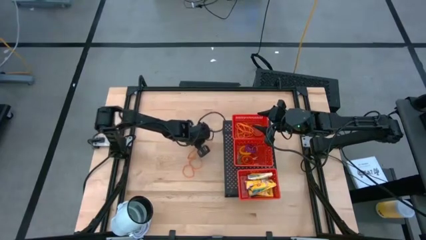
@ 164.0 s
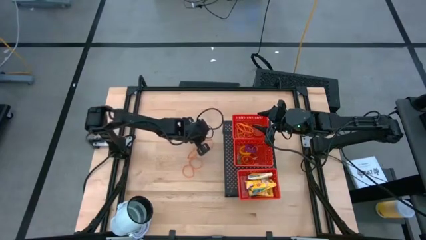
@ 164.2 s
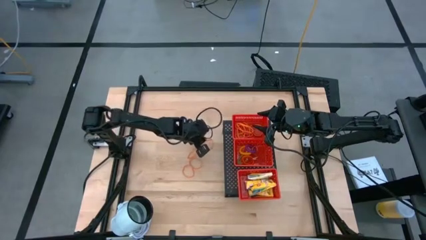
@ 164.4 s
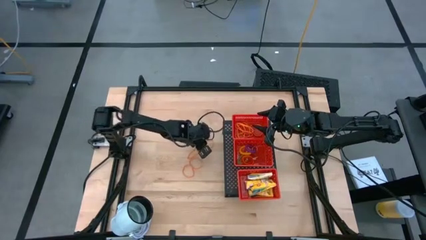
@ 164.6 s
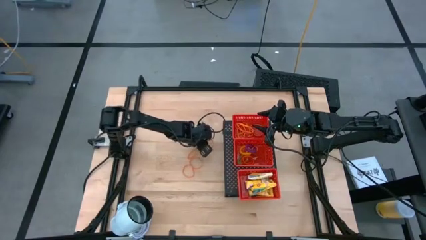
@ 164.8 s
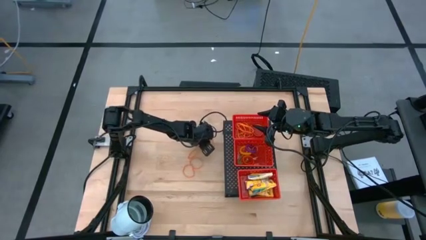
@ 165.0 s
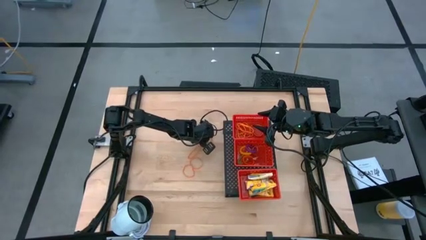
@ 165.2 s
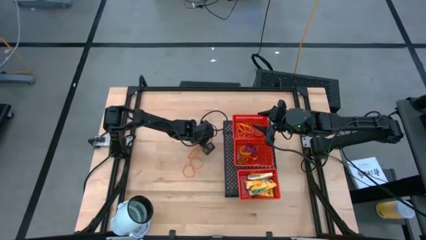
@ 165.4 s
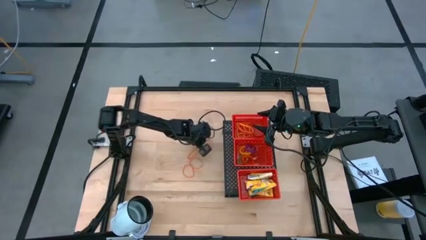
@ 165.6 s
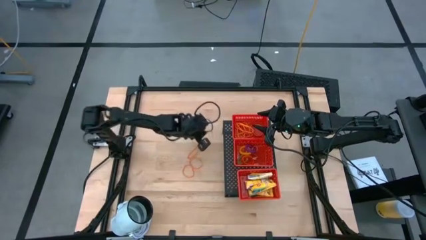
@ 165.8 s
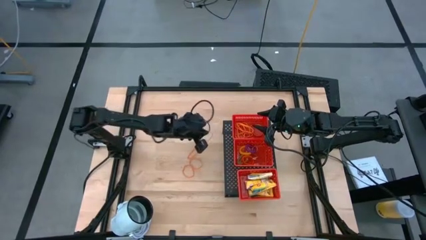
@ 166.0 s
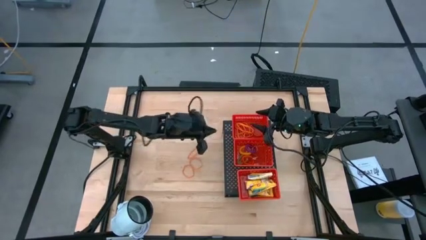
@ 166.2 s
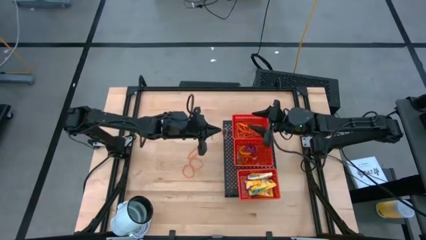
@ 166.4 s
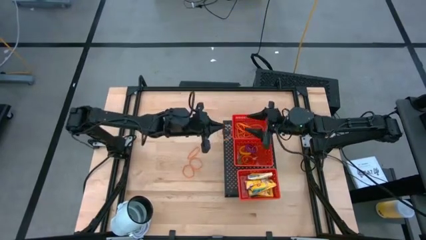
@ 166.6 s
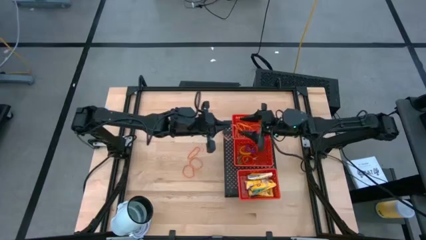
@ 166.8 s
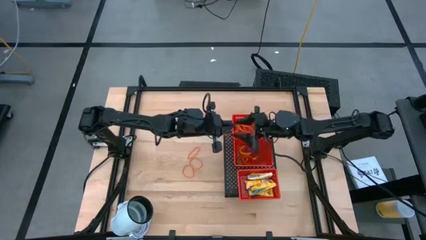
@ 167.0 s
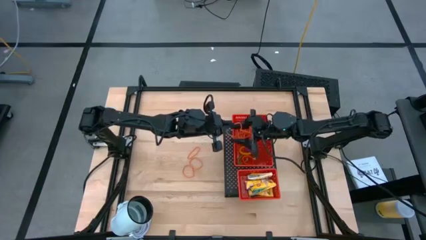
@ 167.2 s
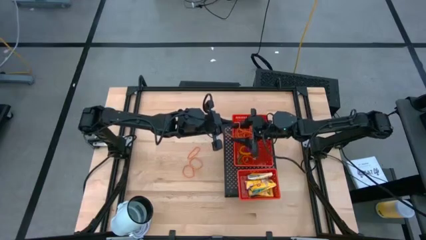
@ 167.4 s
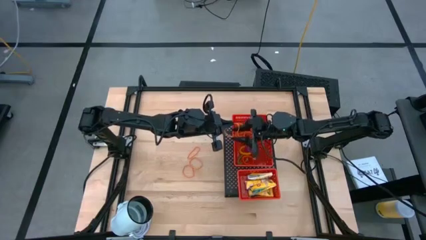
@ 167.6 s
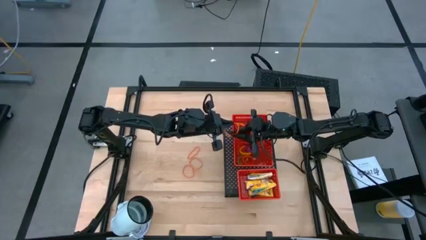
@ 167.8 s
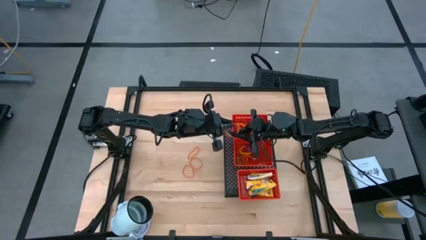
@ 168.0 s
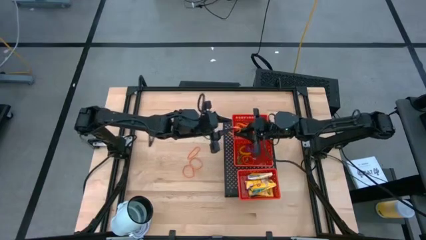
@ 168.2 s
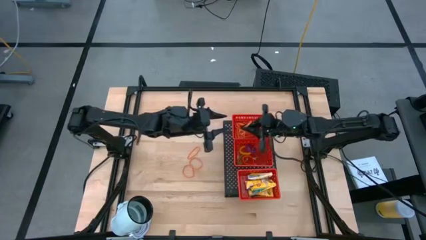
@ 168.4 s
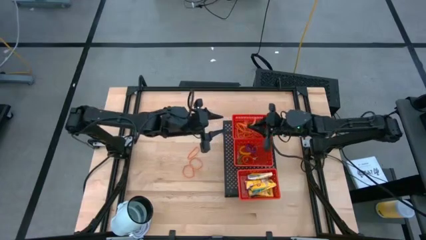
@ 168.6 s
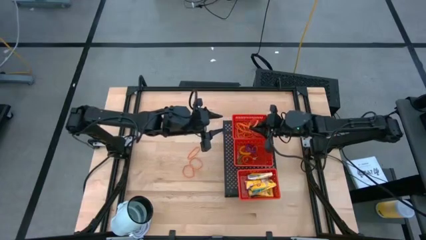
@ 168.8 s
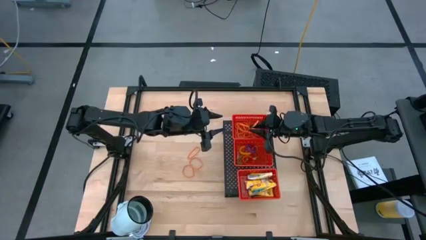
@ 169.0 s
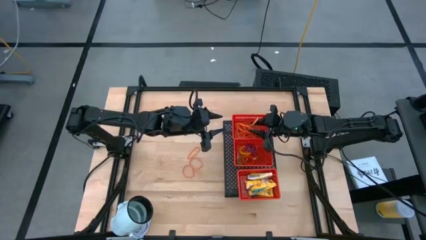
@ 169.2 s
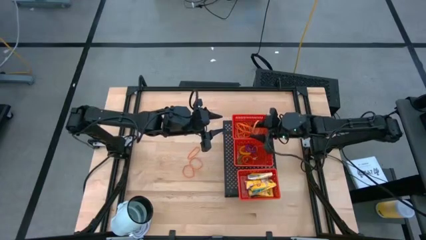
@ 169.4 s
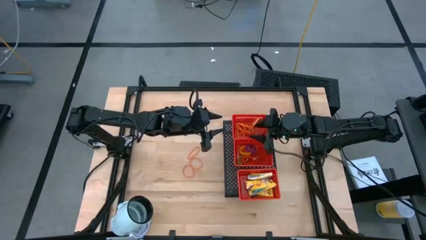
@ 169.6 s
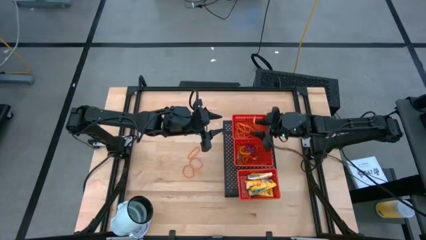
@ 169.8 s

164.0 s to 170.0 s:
Task: Pick & Place Office Desk Supplies
Put the orange rubber band into the top red bin on the shelf

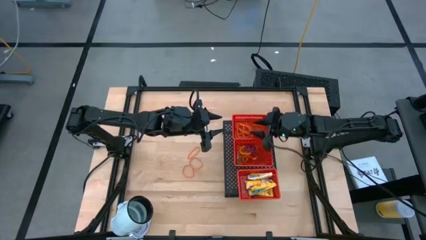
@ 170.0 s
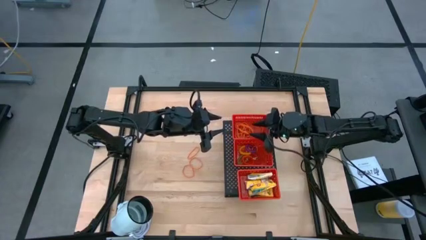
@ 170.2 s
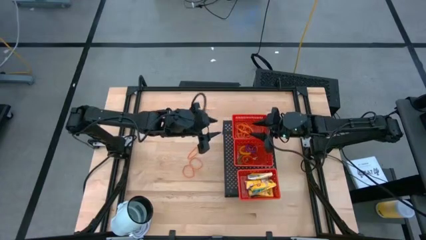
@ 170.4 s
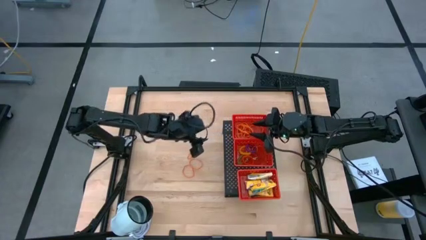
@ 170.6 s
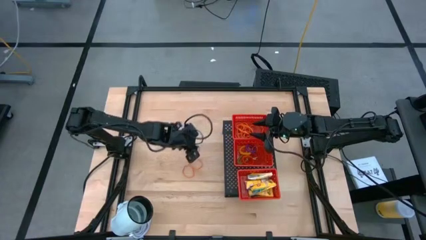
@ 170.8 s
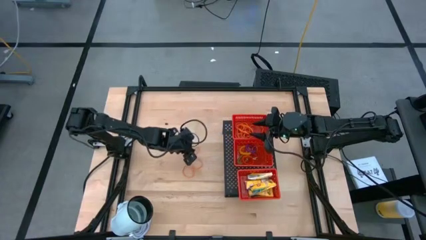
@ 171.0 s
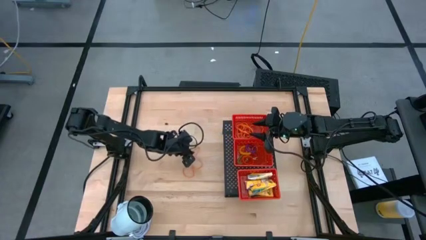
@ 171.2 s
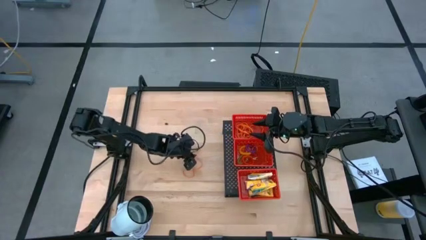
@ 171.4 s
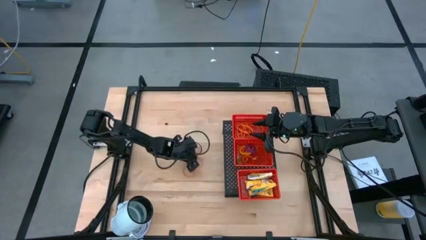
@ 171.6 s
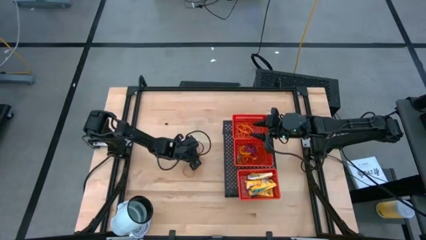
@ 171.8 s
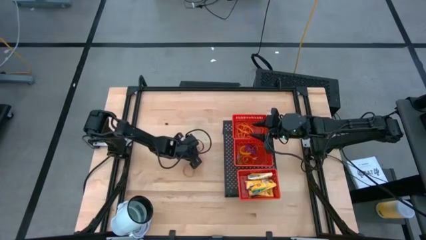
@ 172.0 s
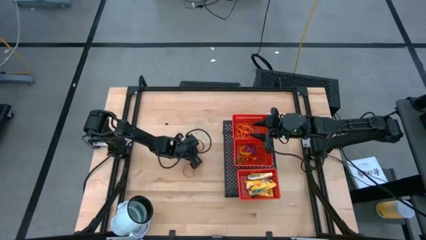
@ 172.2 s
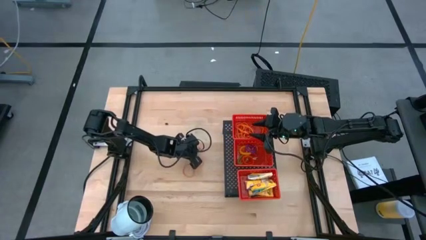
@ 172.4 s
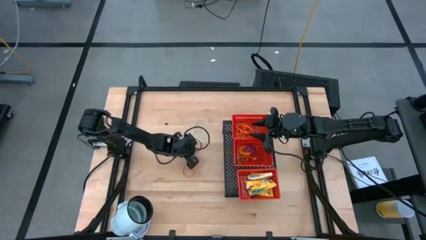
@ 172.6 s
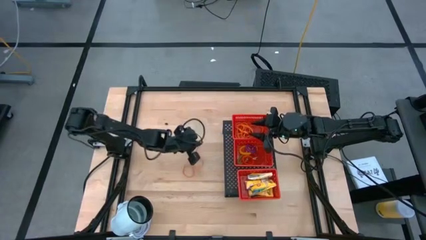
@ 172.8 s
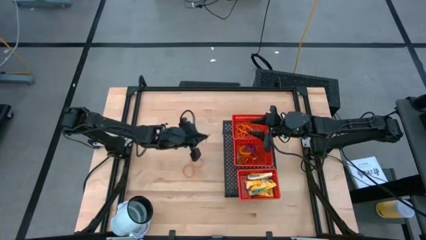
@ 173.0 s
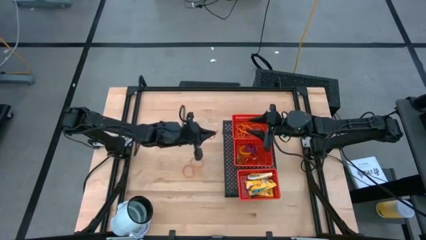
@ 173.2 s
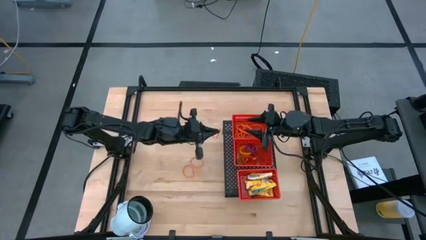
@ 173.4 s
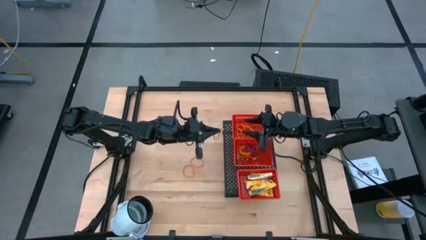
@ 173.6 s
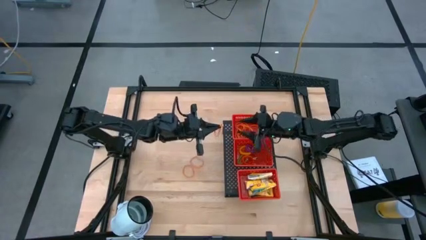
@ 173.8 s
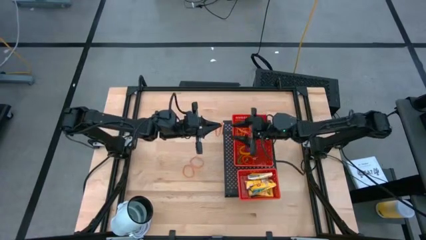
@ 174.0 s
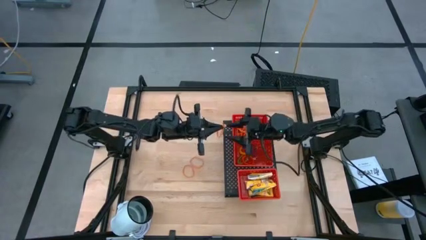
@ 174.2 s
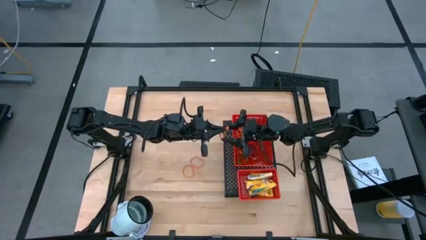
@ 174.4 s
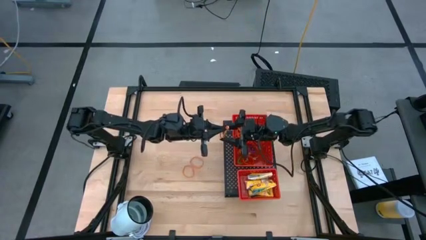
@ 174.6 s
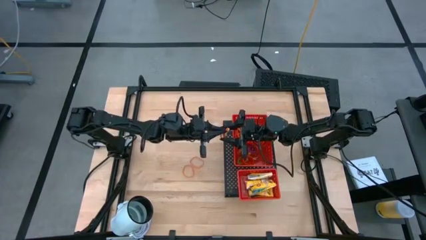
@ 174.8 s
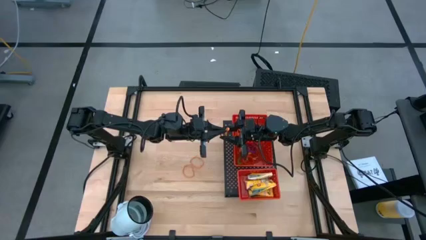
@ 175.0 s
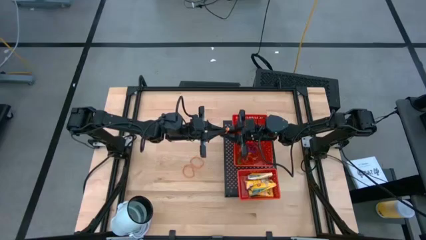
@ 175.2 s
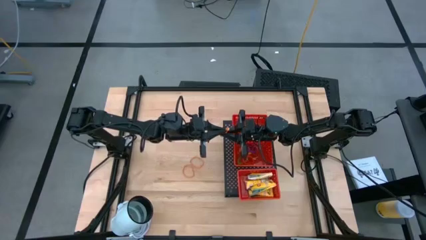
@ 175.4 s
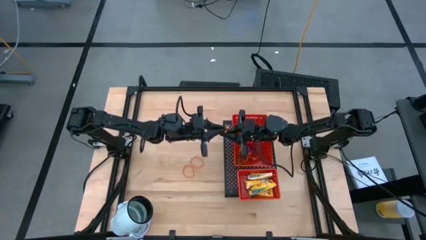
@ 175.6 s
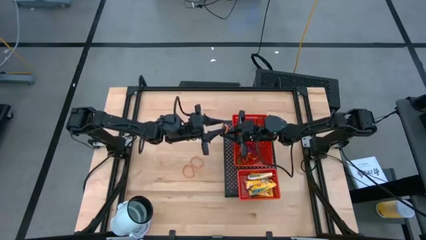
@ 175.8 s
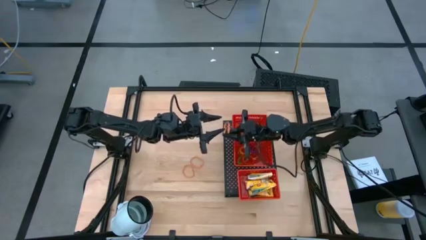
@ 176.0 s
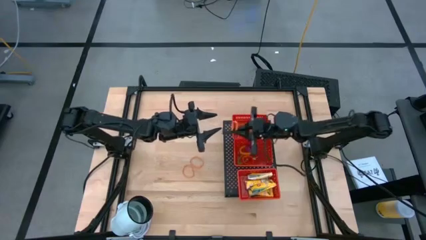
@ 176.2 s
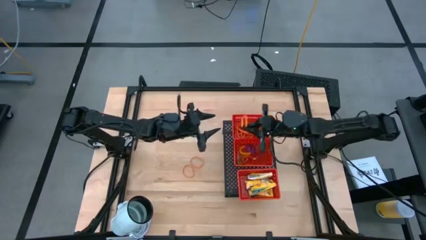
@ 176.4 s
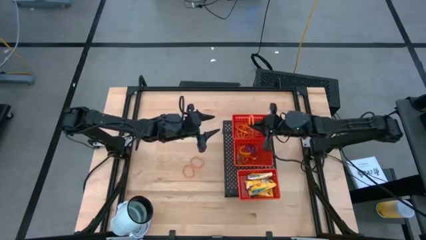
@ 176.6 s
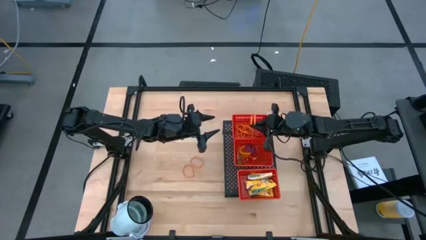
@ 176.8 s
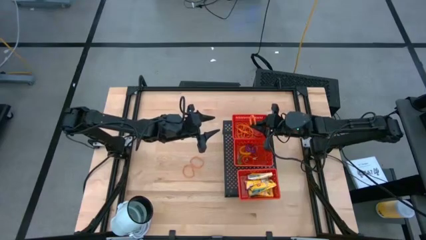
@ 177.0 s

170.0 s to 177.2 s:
Put the orange rubber band into the top red bin on the shelf

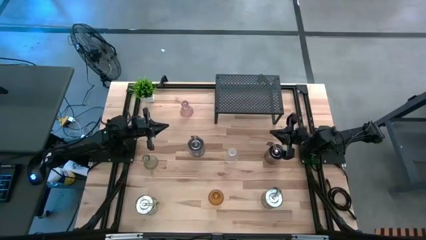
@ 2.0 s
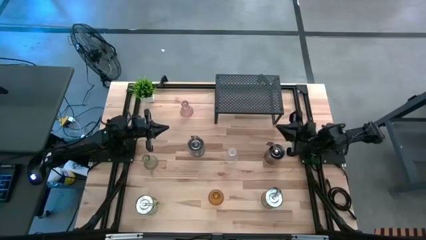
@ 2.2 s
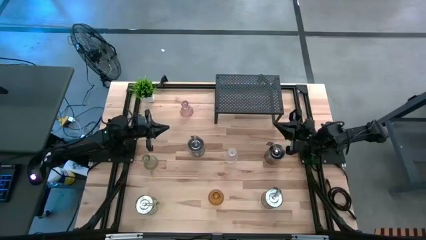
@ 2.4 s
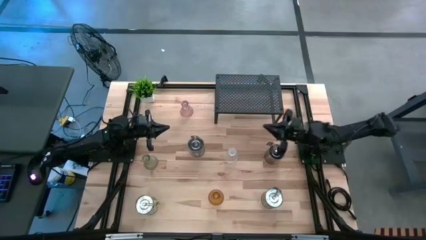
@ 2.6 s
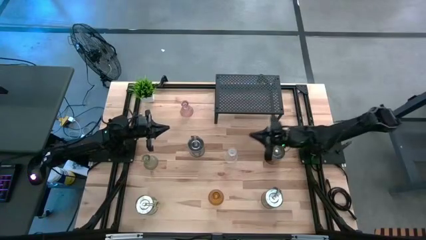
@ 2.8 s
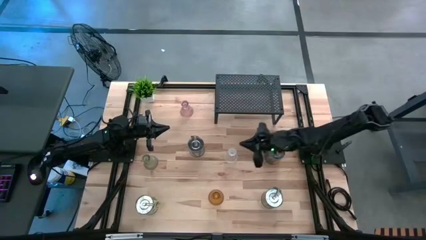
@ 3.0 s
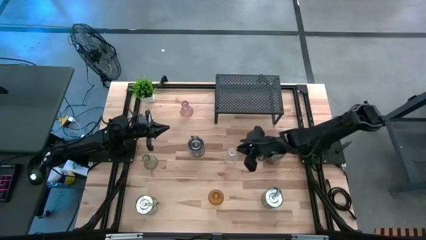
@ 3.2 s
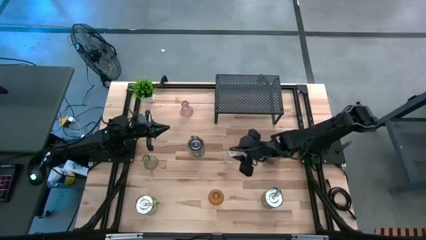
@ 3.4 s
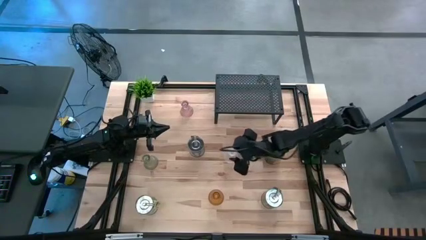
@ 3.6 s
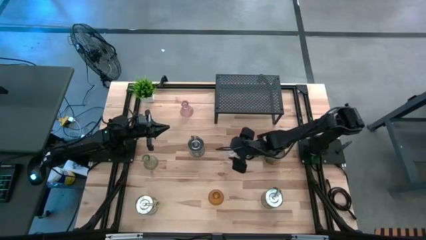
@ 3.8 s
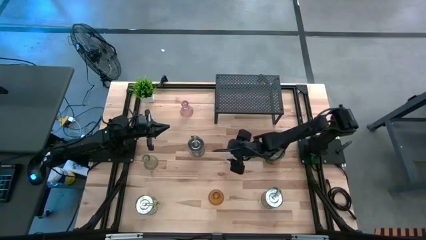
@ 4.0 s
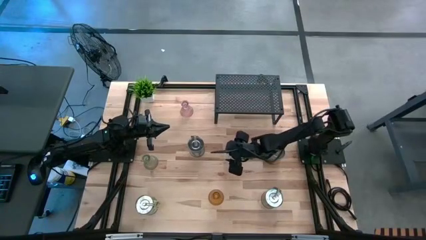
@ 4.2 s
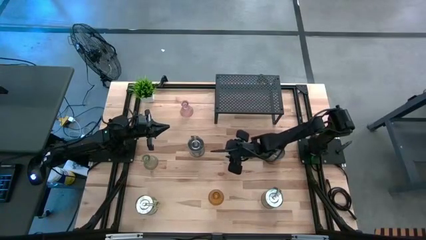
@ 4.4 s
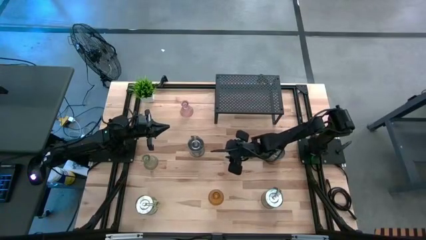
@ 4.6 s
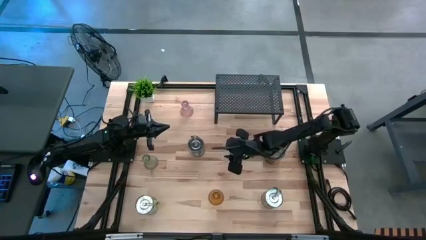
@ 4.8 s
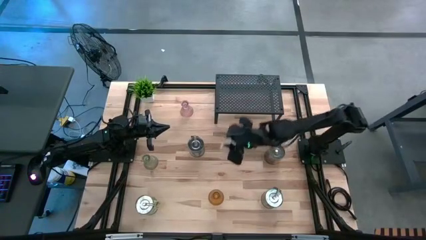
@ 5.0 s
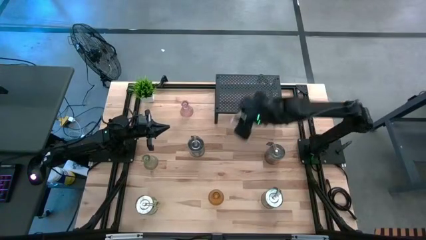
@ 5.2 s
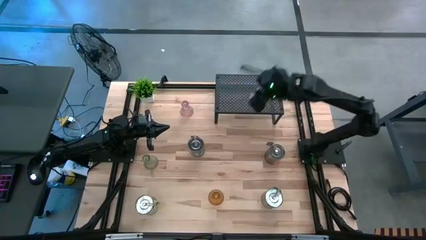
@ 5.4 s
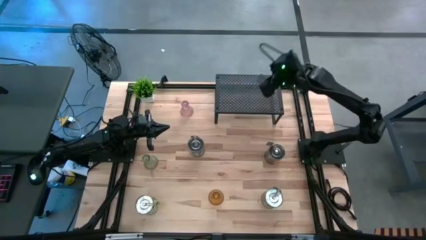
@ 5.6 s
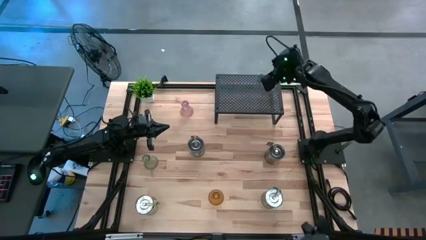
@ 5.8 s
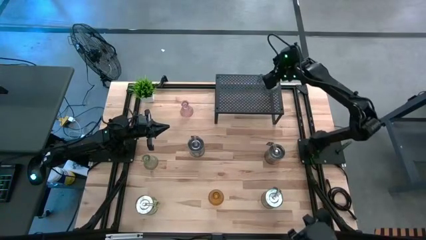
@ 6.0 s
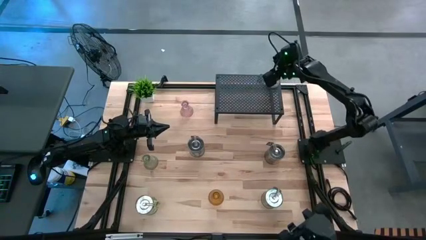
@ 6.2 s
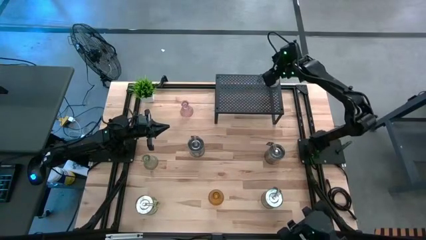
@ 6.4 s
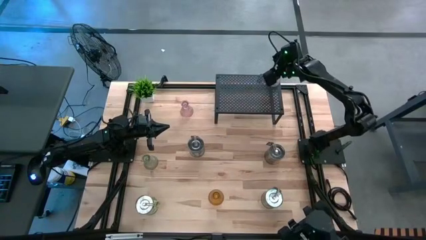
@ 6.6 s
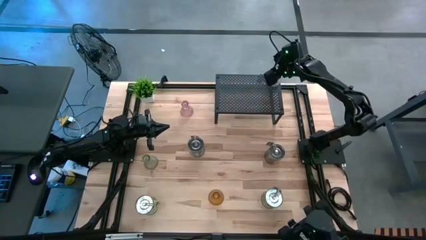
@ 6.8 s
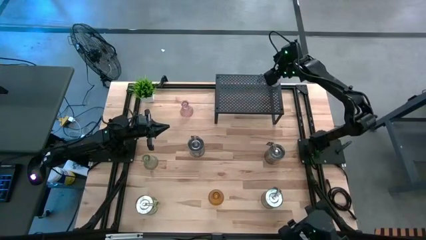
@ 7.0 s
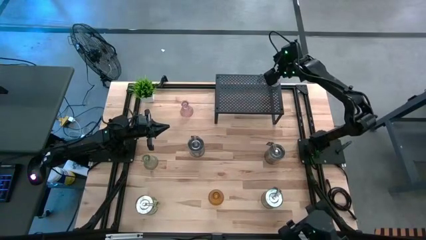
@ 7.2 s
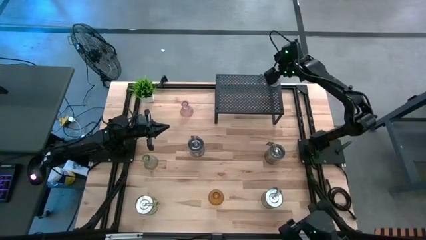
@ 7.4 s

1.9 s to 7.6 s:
Task: Pick & Place candle stick holders
Put the transparent candle holder on the shelf
